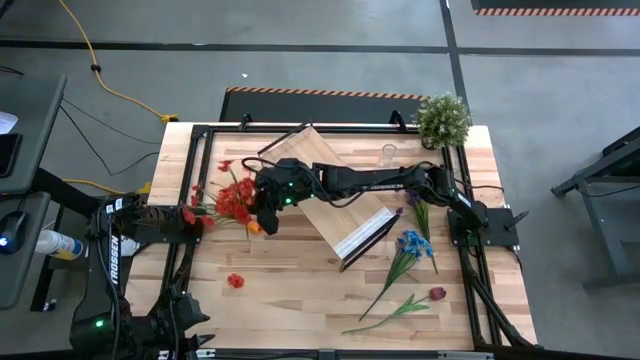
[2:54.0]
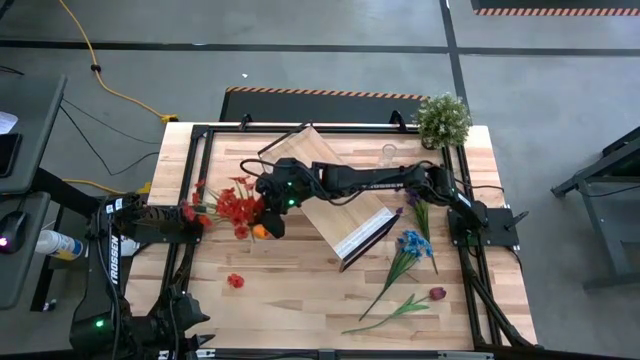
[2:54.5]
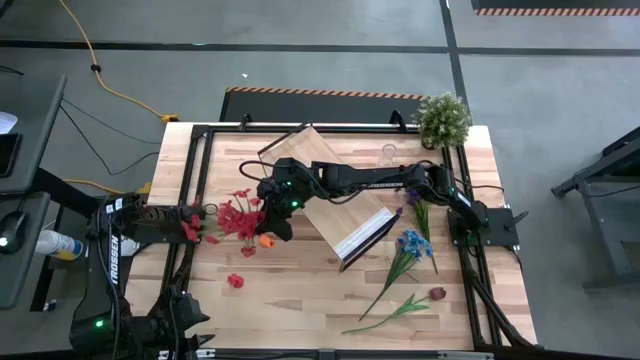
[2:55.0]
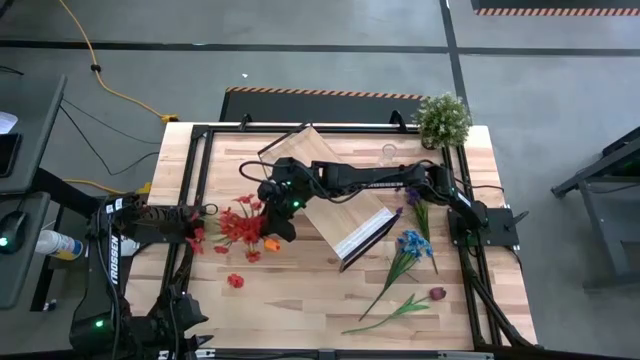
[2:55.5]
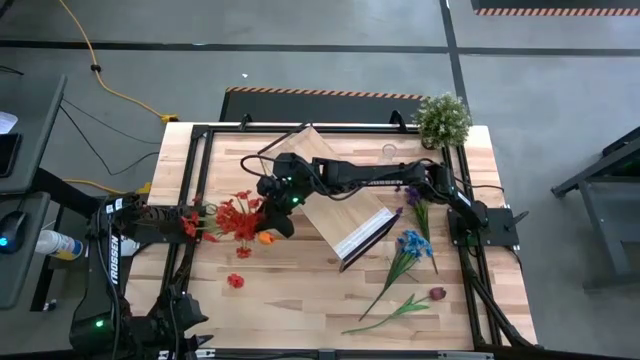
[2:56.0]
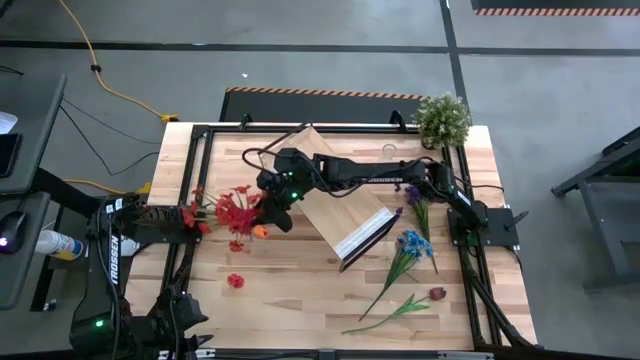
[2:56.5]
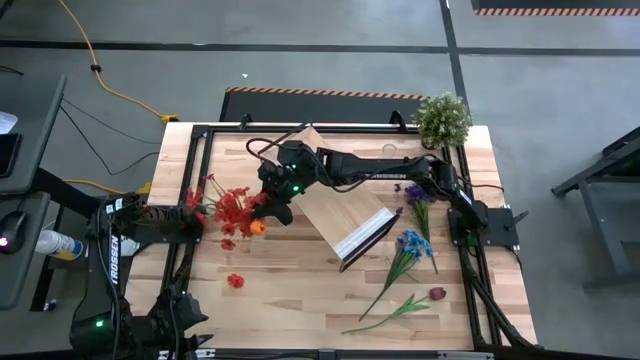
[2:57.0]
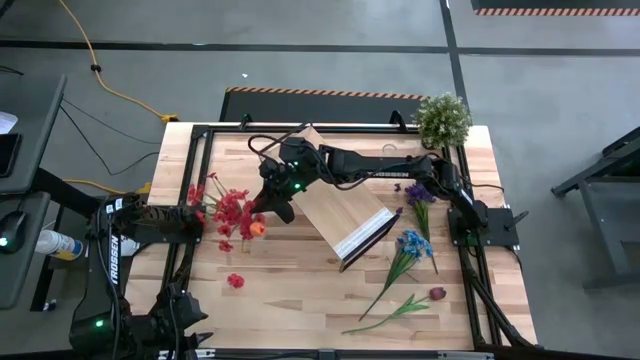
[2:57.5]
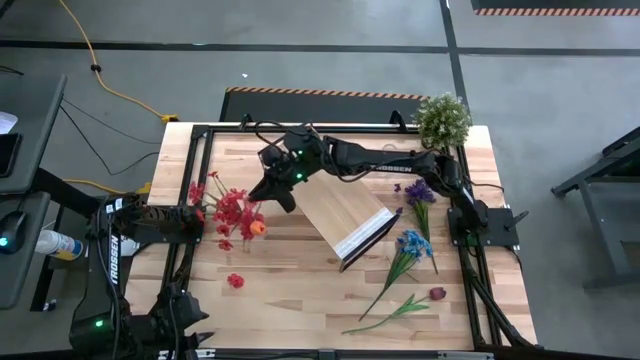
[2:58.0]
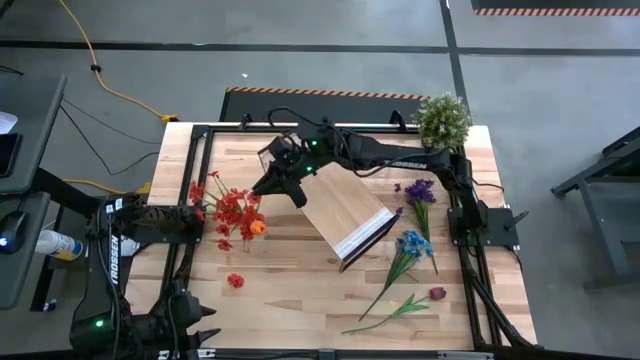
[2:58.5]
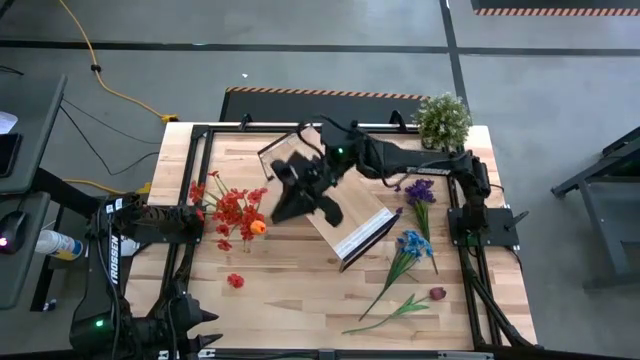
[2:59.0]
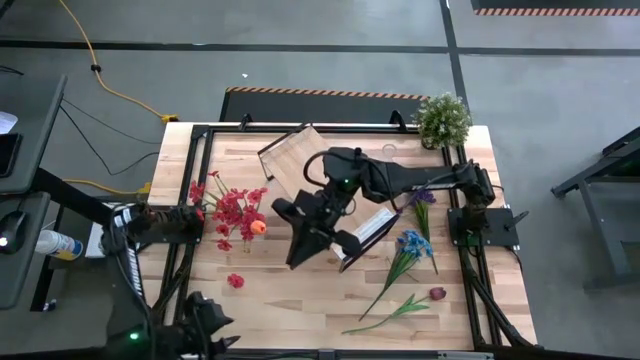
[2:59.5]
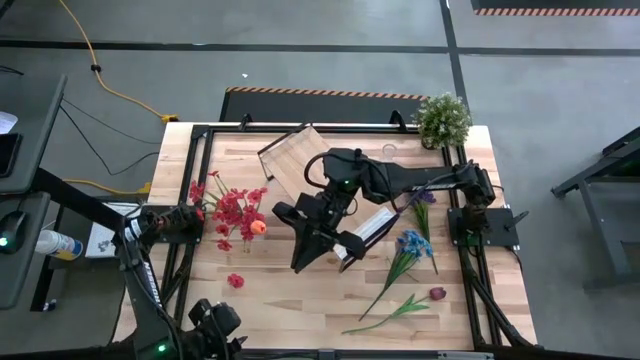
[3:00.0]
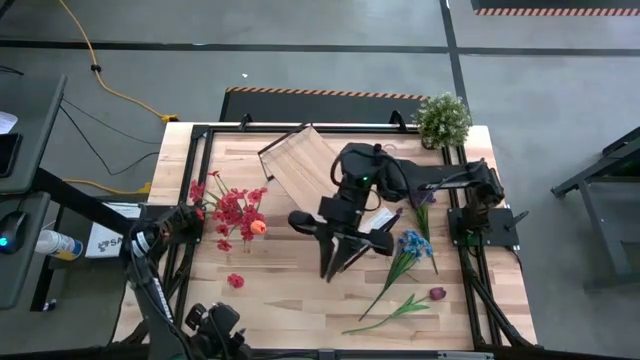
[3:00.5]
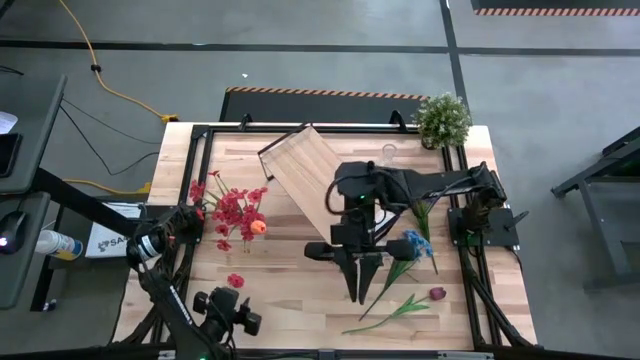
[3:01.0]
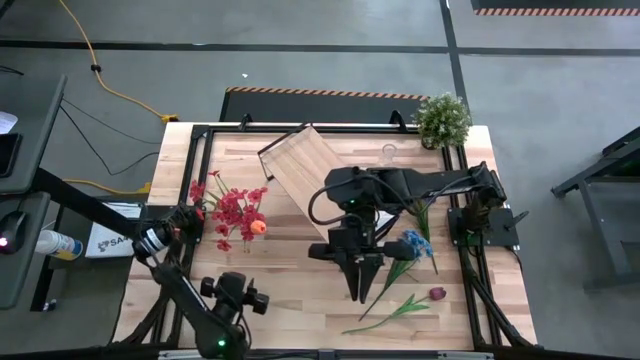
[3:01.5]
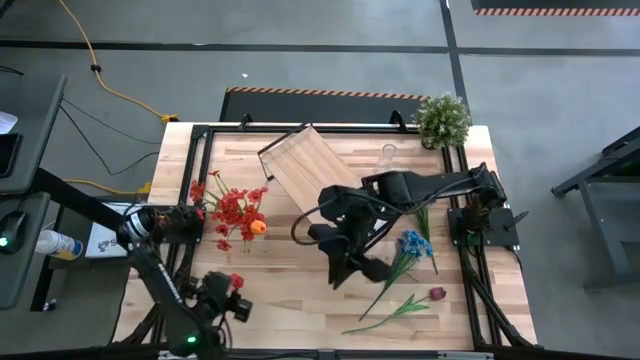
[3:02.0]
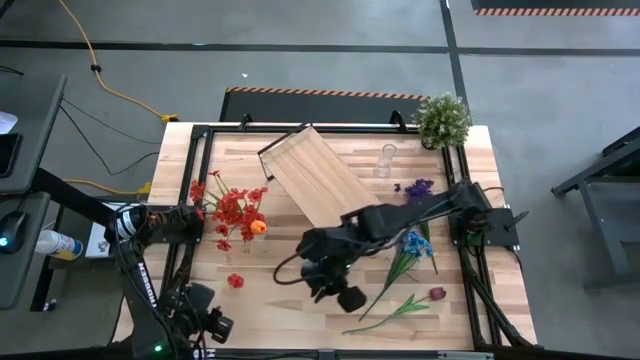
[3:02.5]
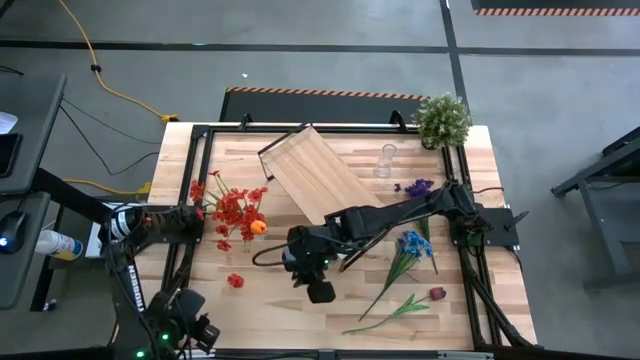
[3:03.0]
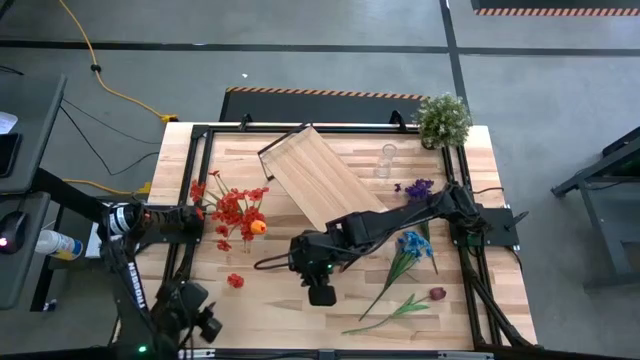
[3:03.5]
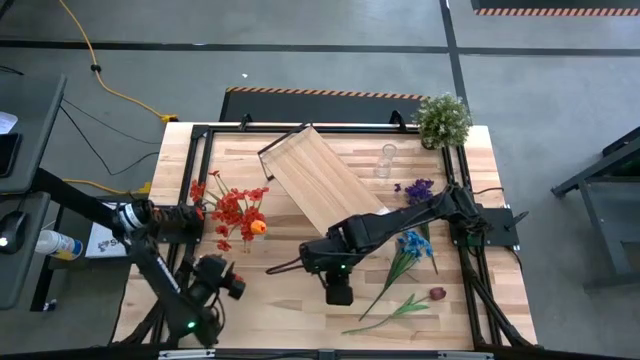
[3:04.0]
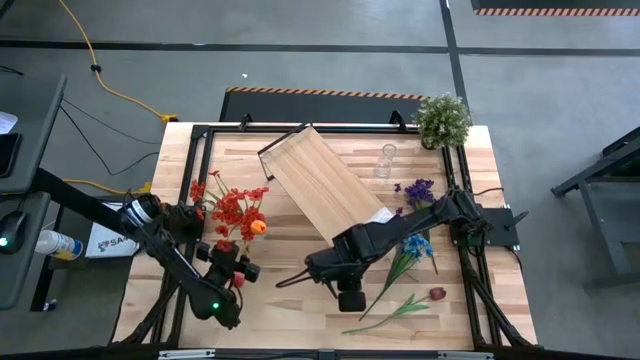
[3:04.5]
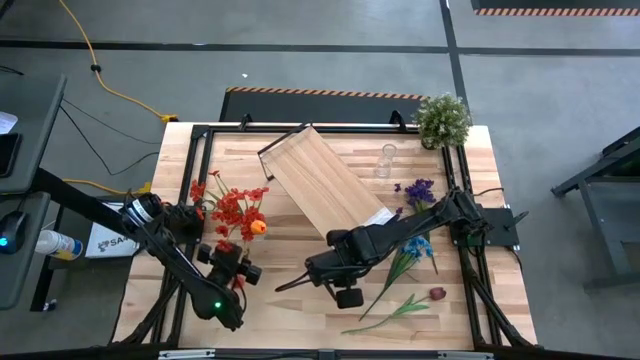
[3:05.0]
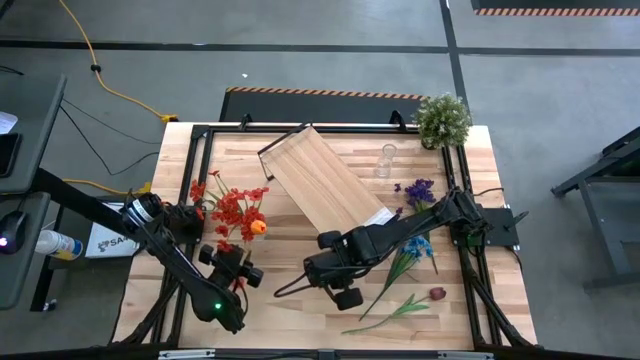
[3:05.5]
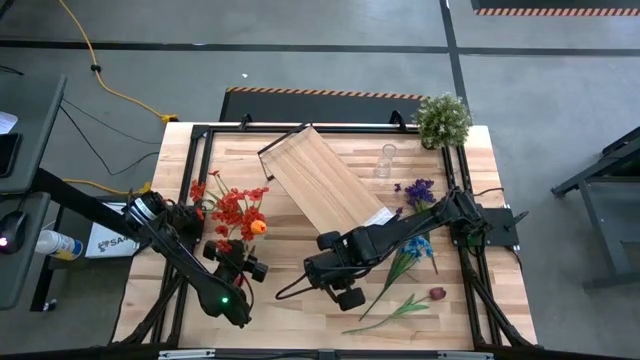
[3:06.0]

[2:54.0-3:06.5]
Task: Pick and place flowers into a vace then onto a shelf
Put the red flowers into the bottom transparent vase

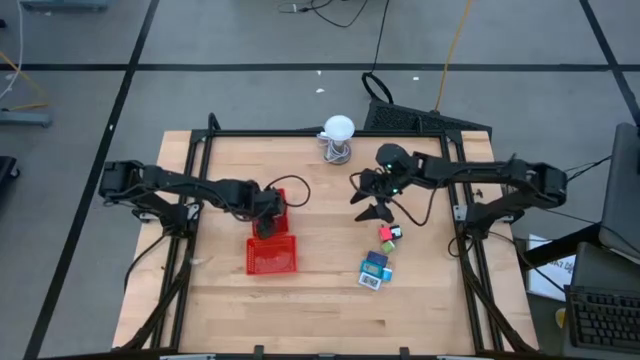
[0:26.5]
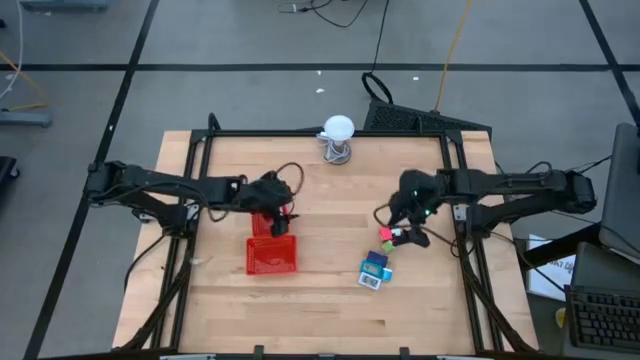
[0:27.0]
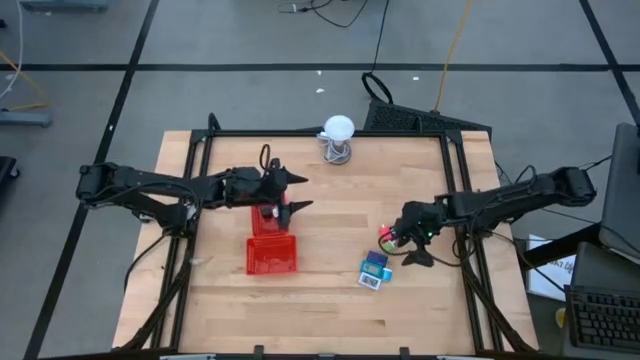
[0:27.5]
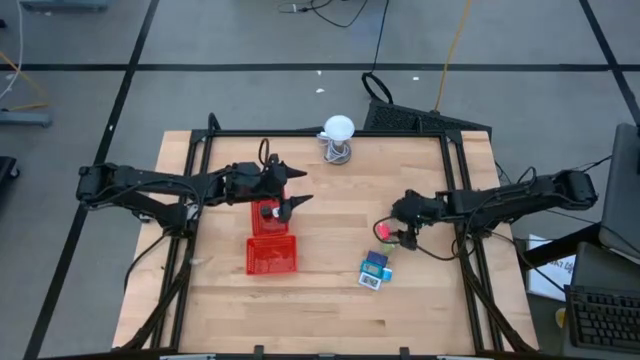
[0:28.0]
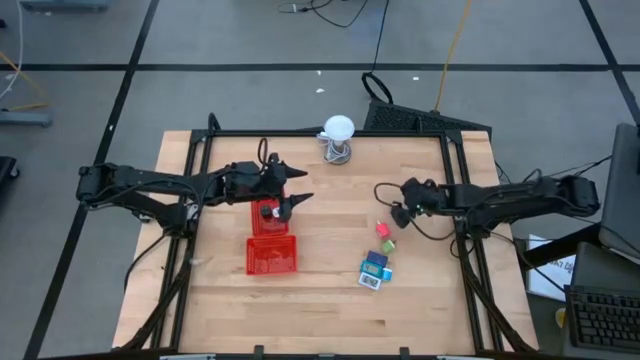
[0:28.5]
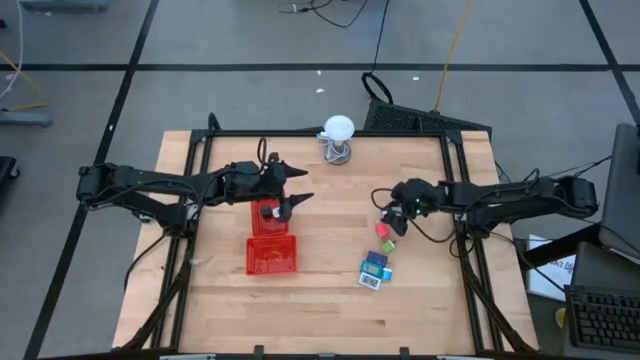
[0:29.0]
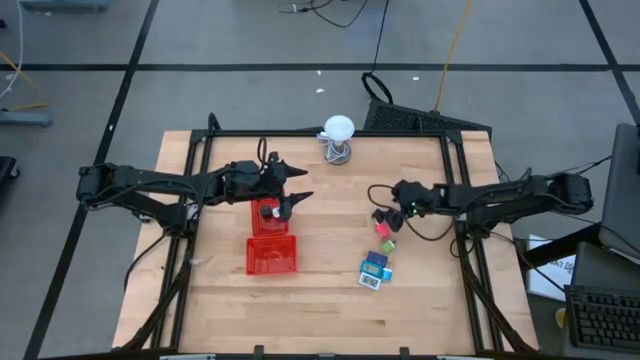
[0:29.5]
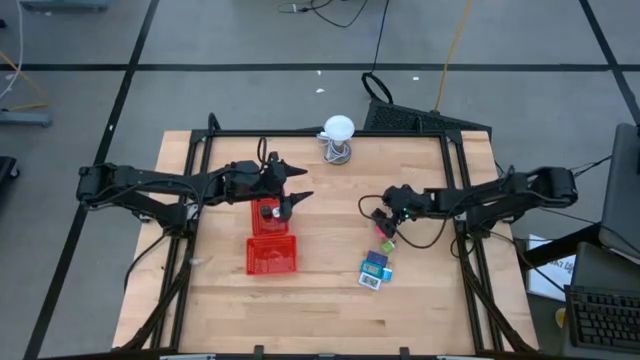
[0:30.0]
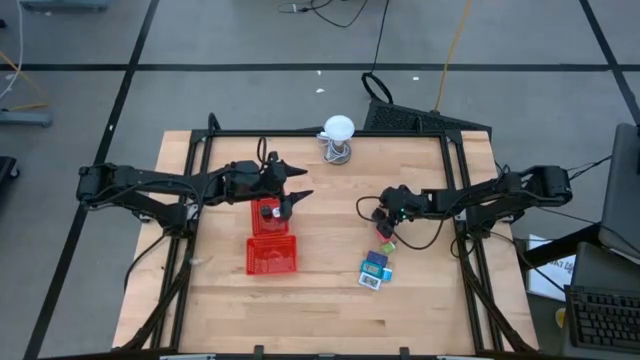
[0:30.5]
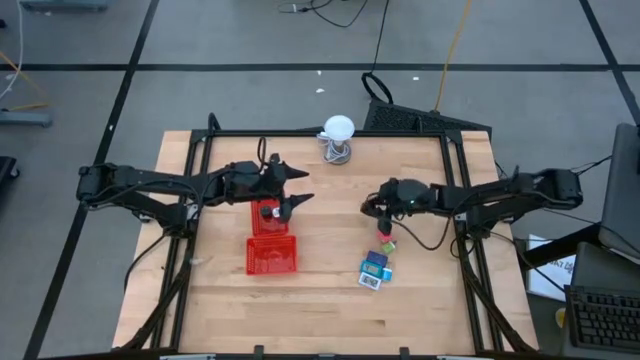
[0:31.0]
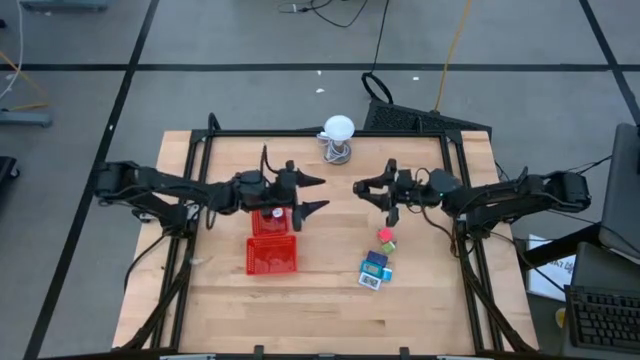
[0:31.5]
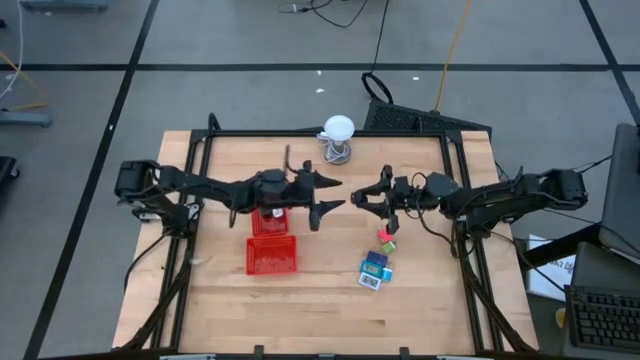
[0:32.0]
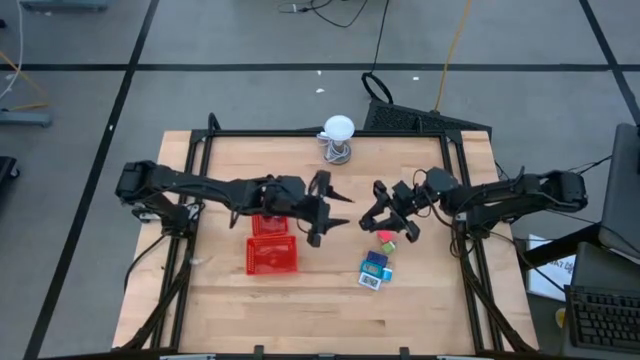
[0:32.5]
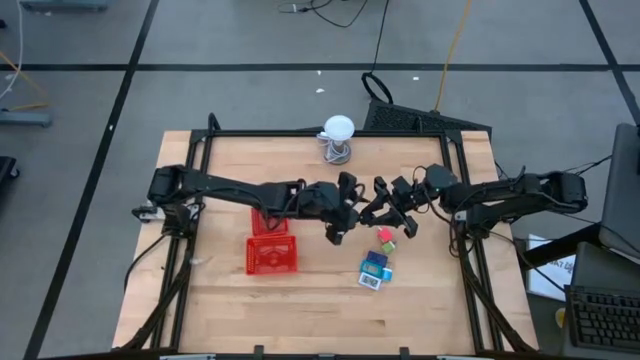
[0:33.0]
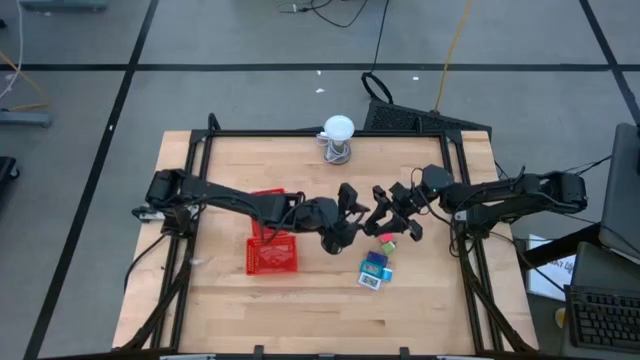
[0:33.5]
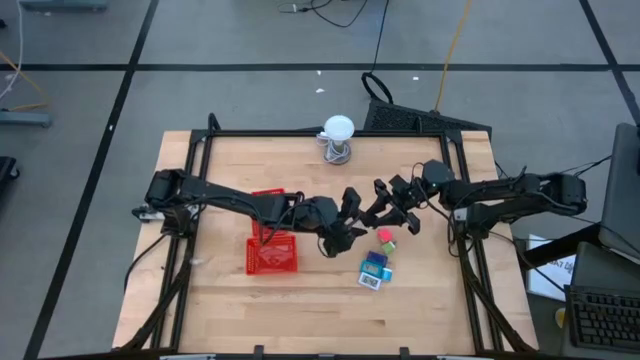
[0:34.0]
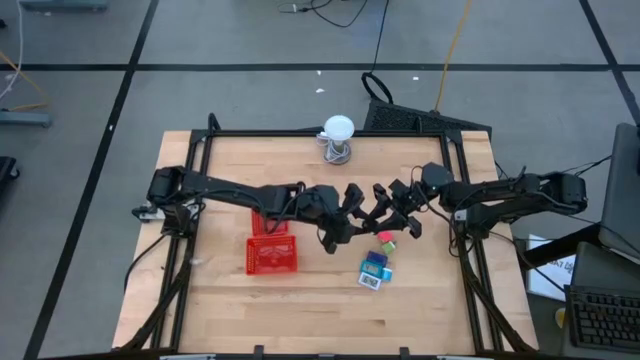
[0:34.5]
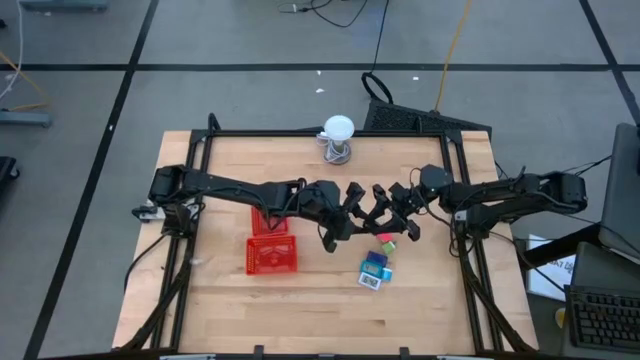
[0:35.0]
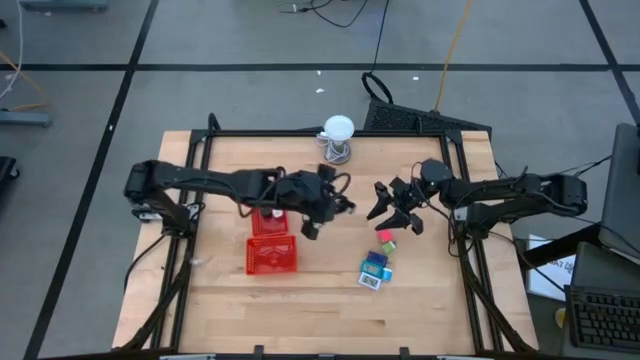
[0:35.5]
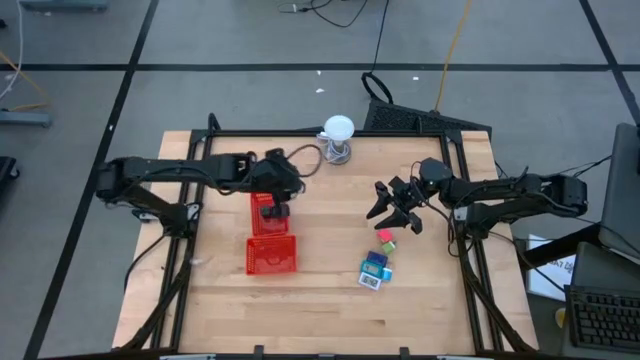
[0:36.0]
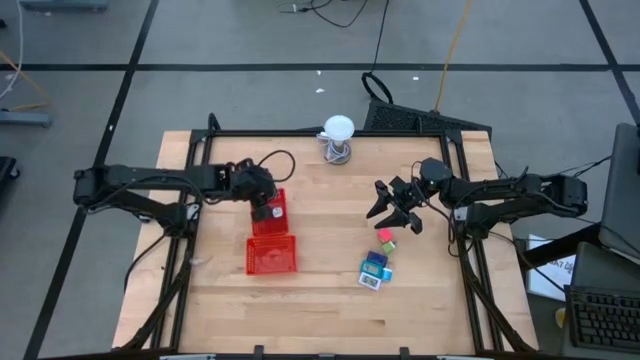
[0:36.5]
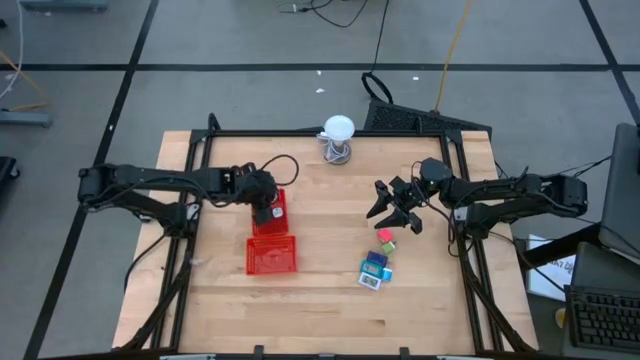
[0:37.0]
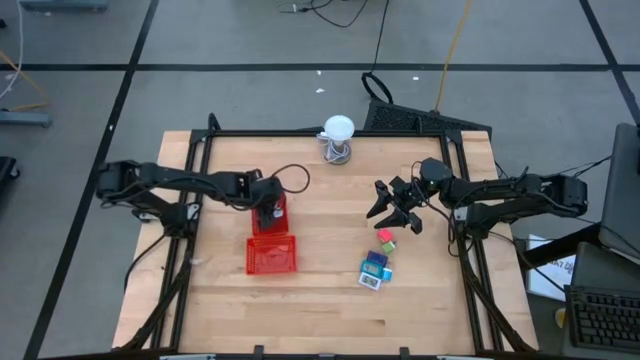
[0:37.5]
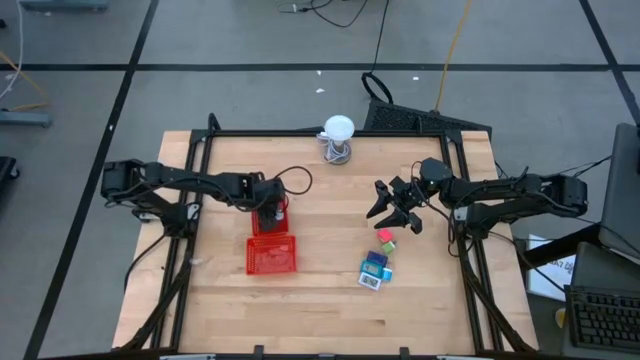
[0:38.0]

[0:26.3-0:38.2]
Task: Pick & Place Office items
Put the black charger adapter into the top red basket
